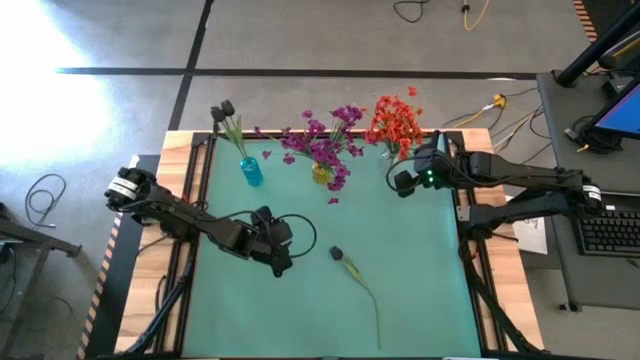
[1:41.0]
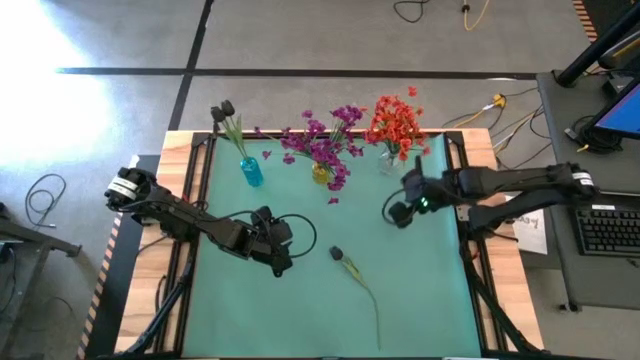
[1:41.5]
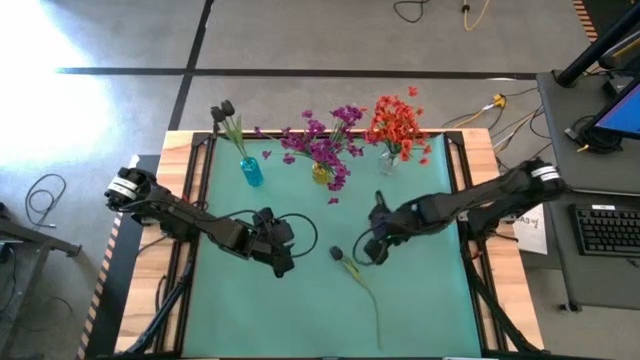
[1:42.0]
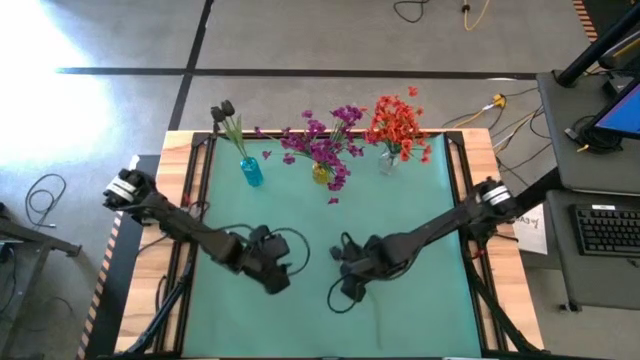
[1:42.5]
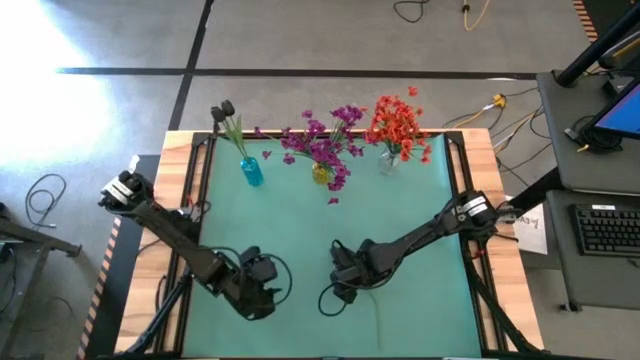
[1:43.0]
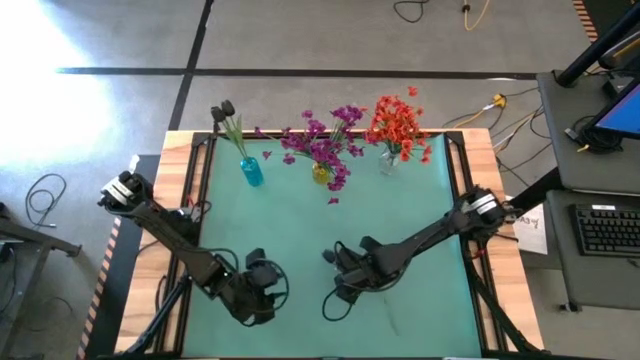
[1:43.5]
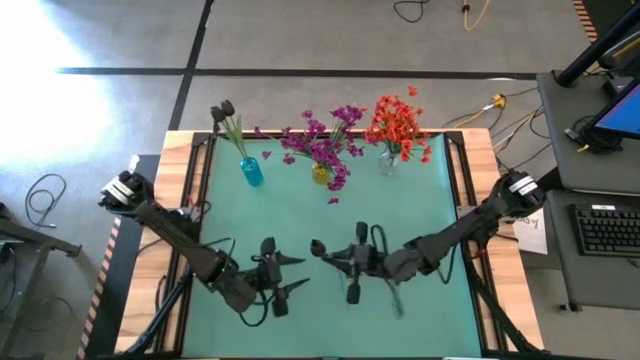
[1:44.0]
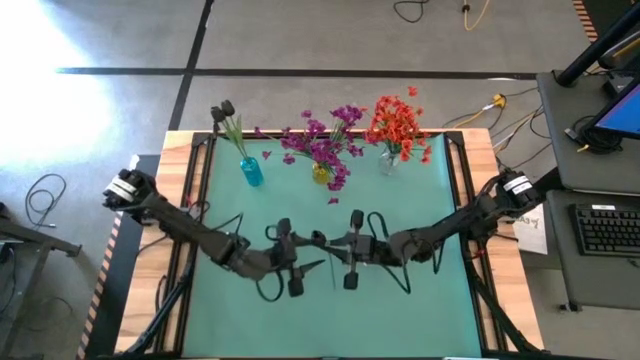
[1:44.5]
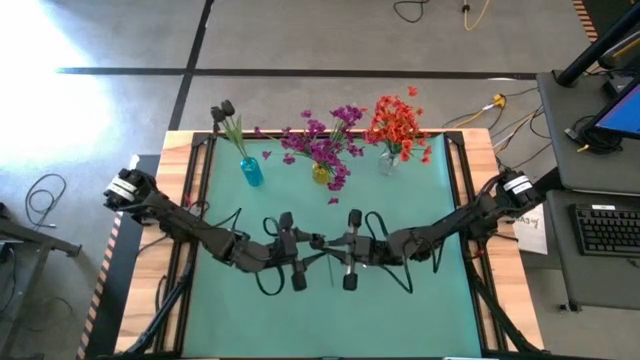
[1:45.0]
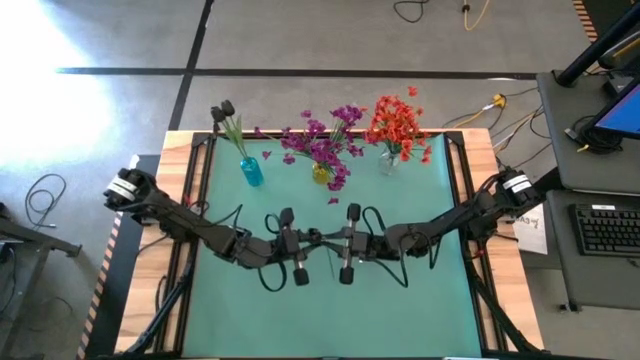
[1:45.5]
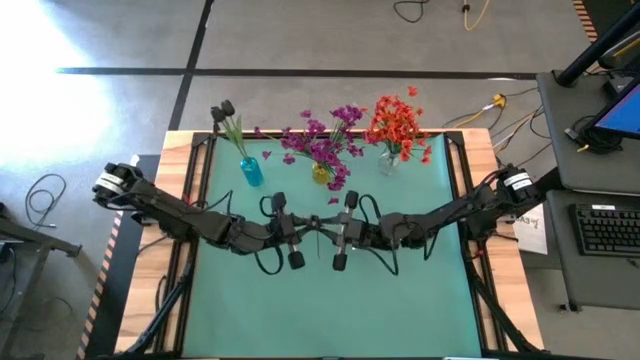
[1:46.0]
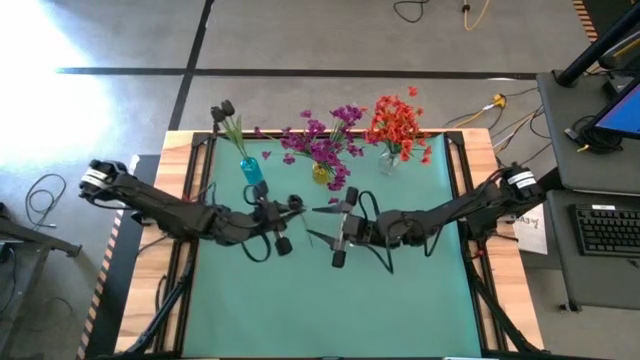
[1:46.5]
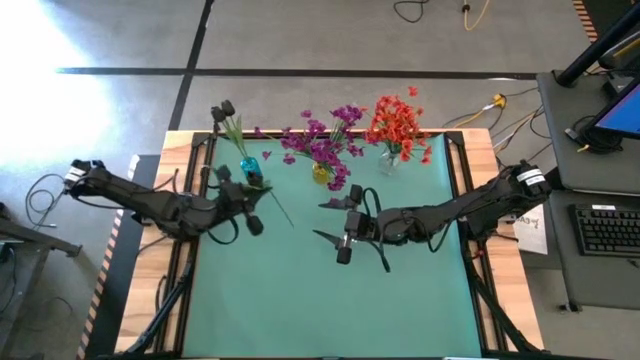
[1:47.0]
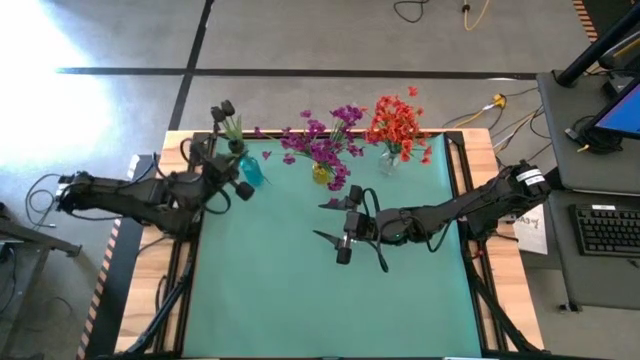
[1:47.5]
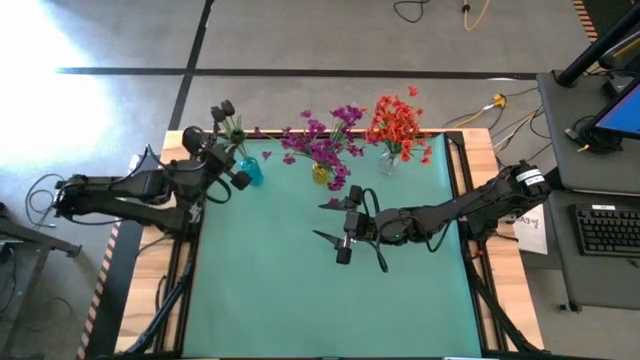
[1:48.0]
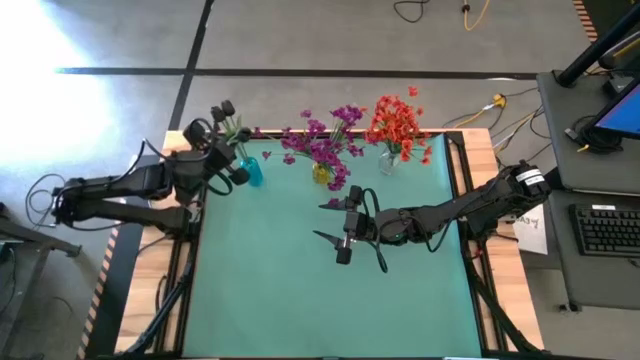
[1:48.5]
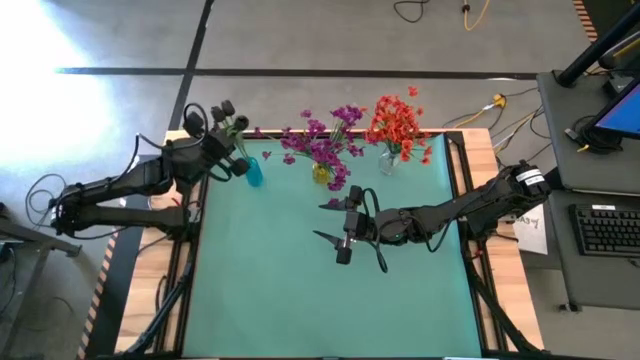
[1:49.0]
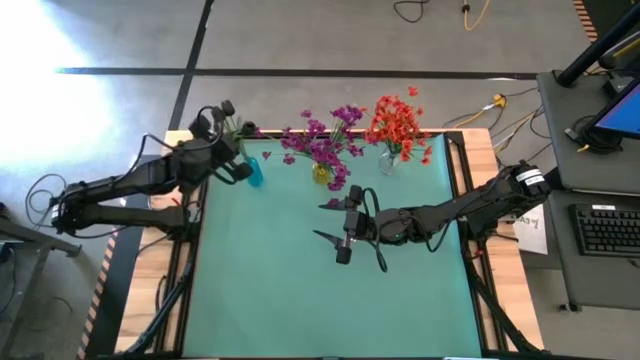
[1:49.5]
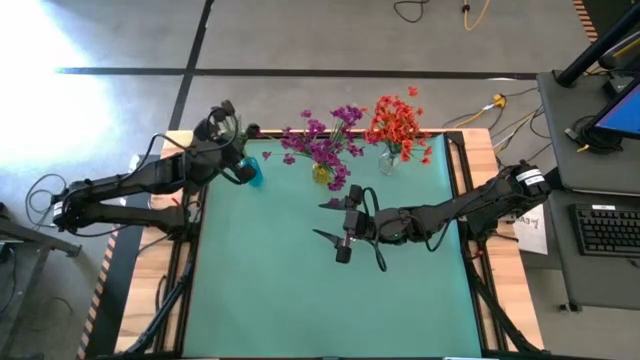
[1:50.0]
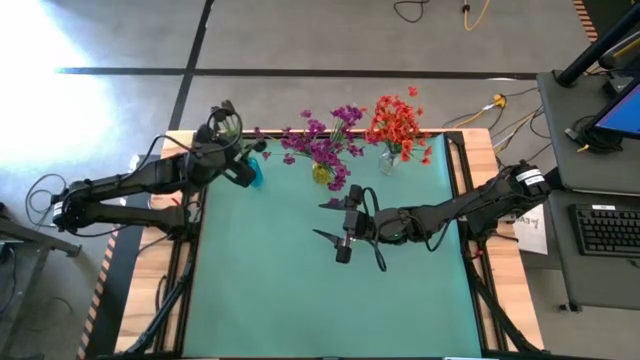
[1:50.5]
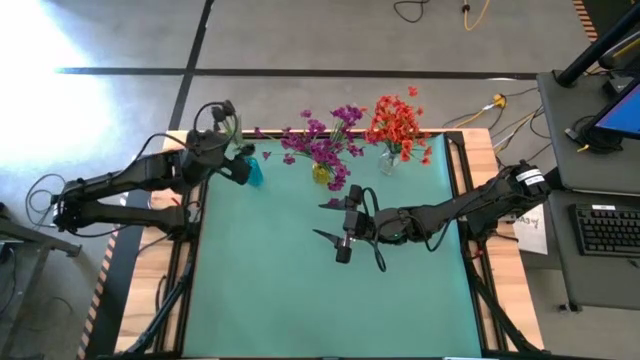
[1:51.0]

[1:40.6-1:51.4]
Task: Sort flowers into vase by color
Put the black flower into the blue vase

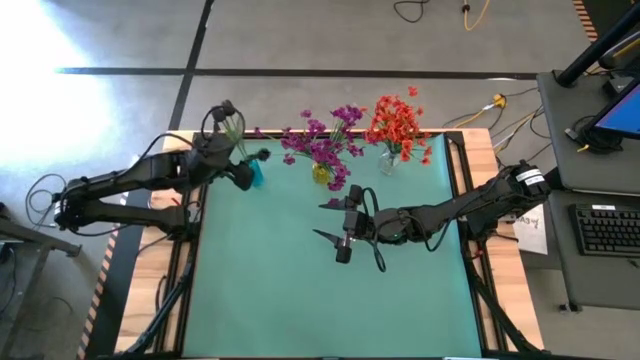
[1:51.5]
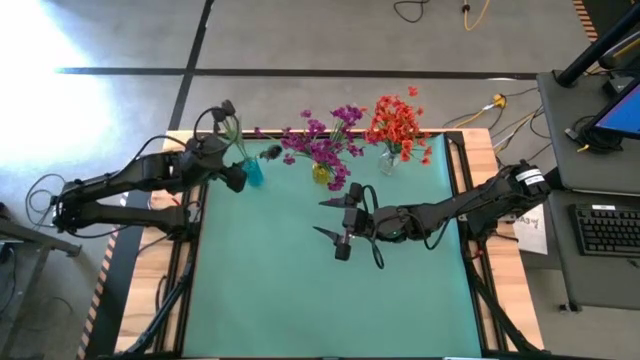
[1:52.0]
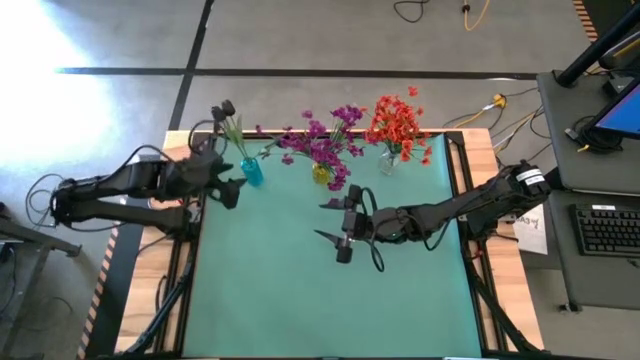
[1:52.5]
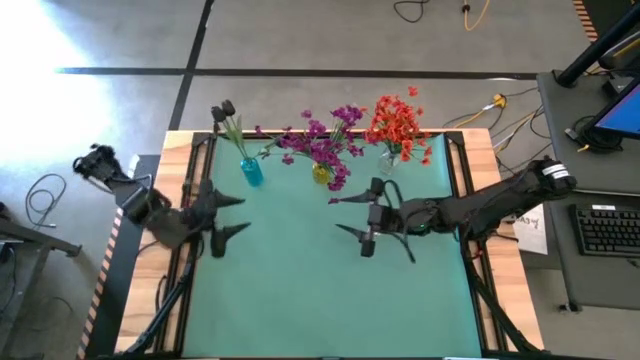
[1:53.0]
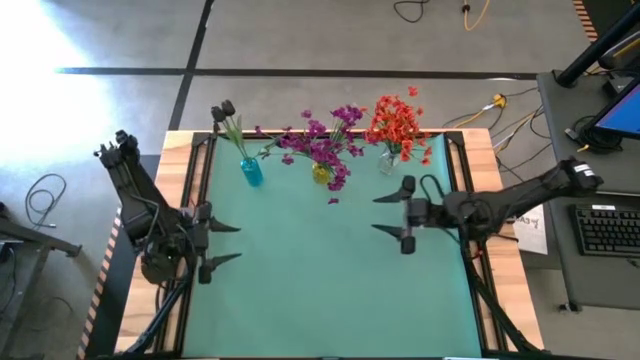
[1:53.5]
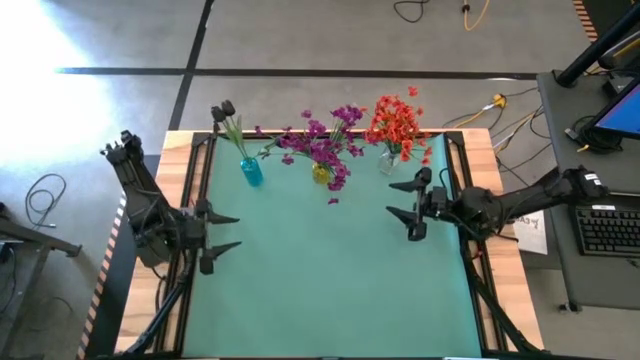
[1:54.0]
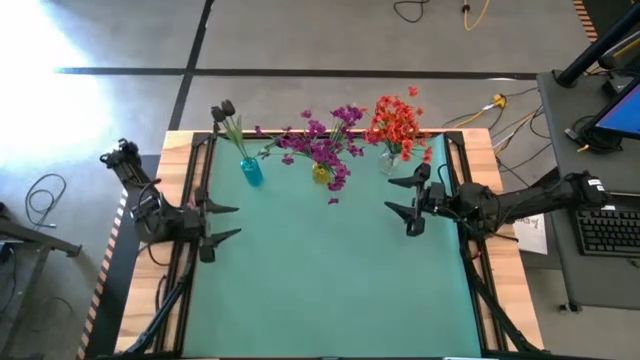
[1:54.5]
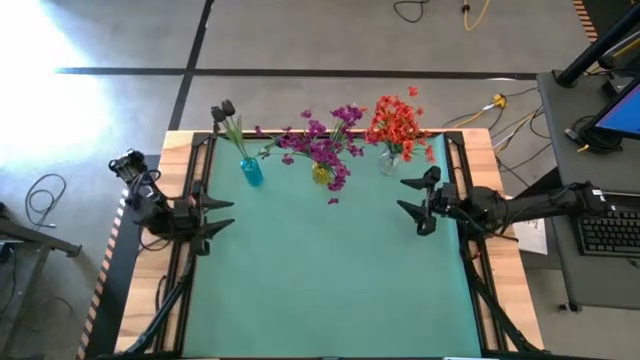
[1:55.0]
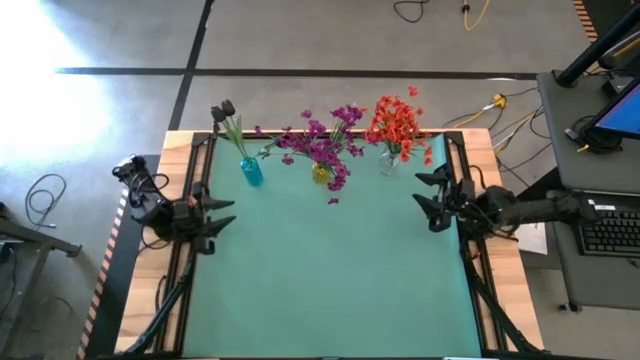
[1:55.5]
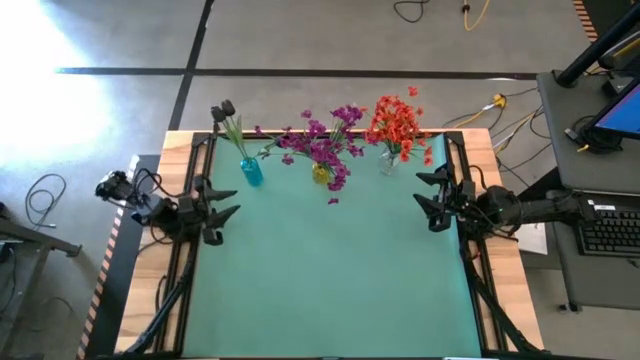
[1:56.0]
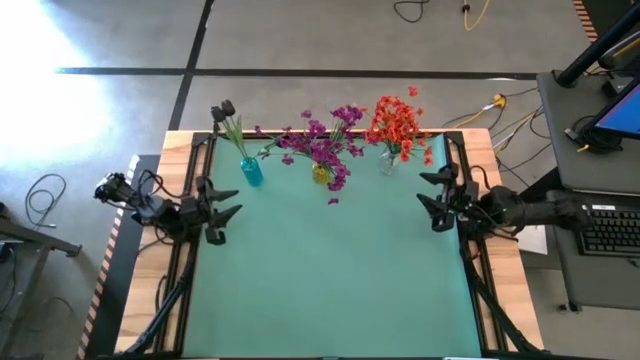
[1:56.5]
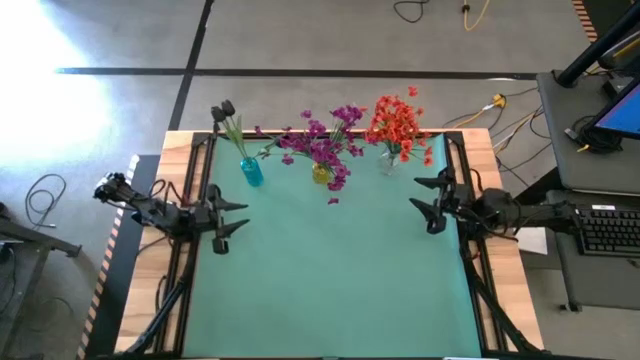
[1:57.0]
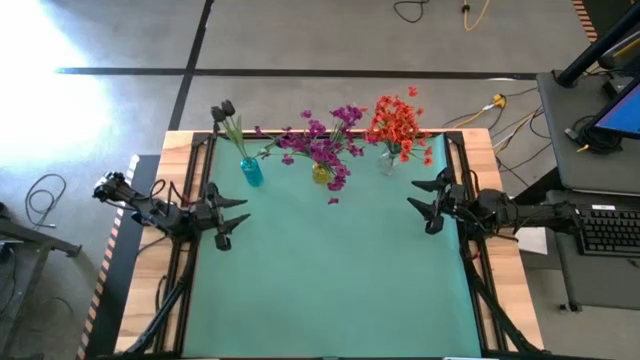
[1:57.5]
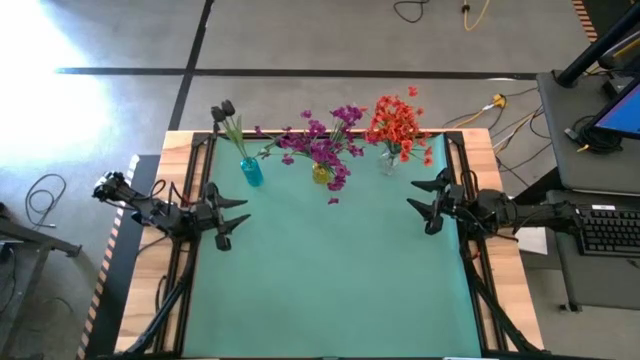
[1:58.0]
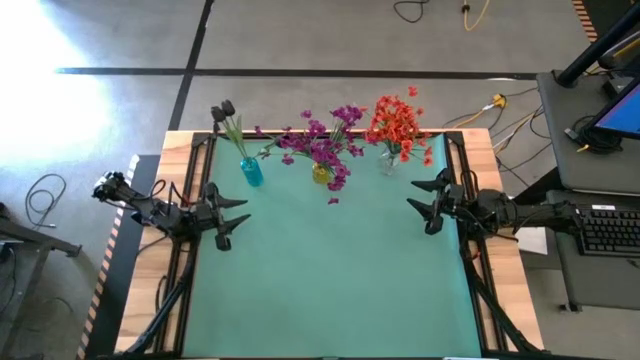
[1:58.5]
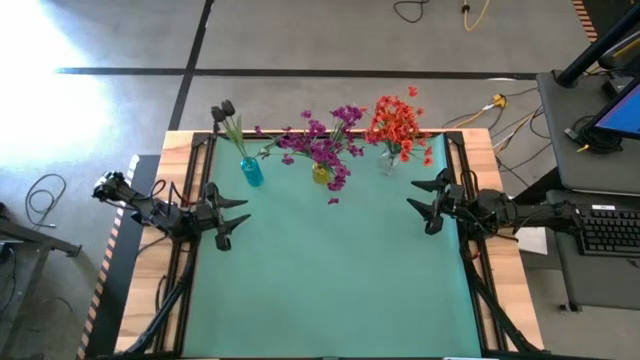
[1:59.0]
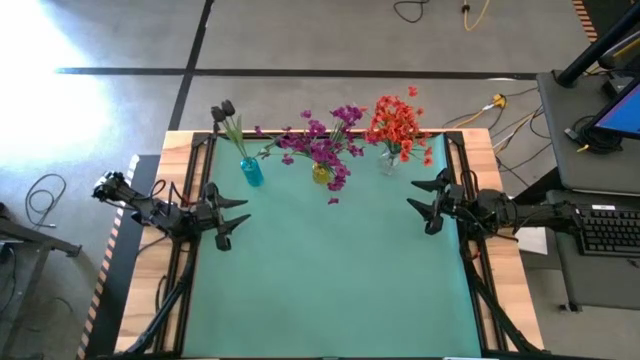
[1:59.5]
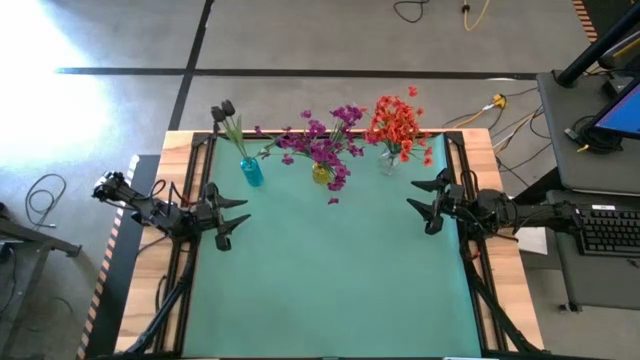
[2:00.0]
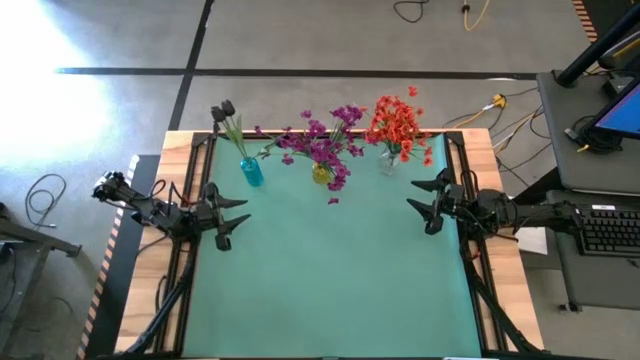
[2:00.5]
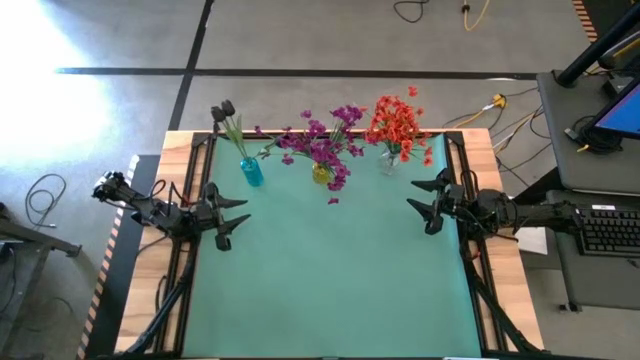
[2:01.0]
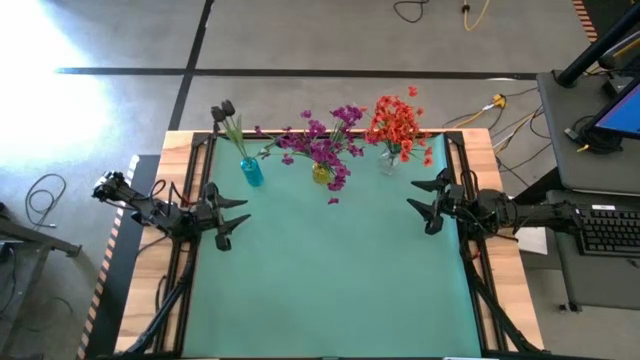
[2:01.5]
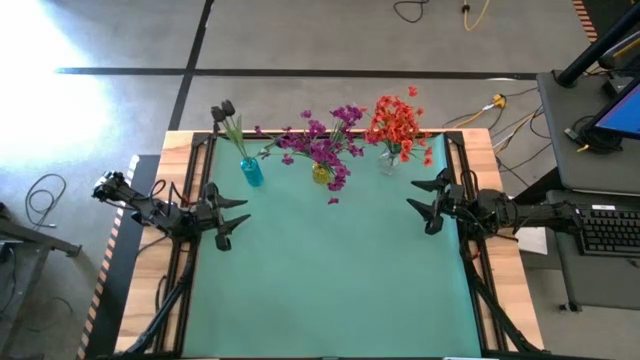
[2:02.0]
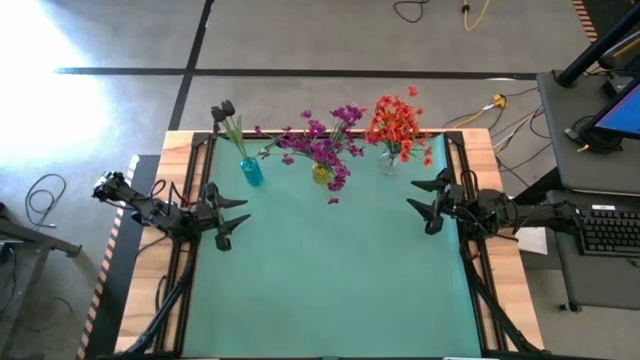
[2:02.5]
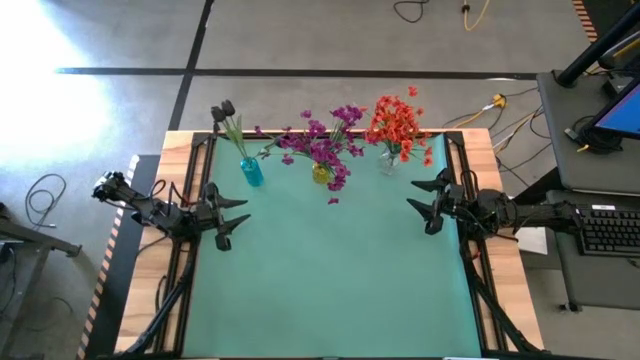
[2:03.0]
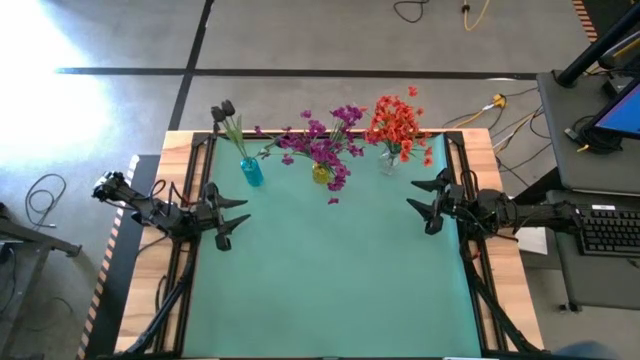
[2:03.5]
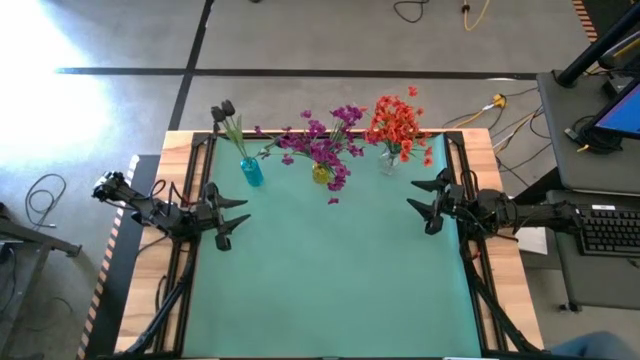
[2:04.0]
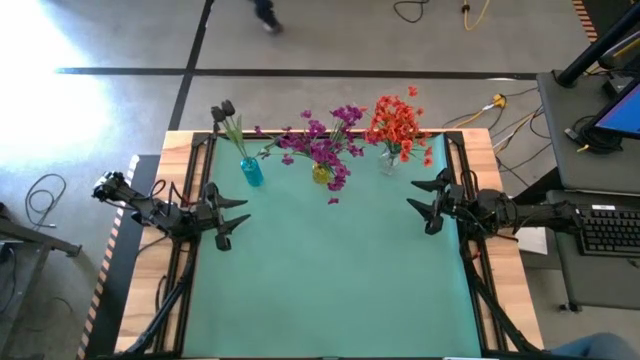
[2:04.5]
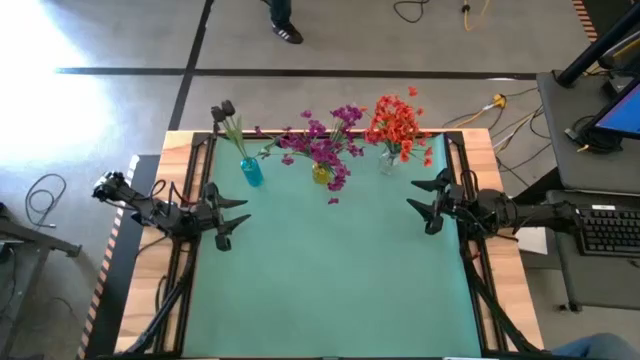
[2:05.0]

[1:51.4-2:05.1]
Return to Home Position
